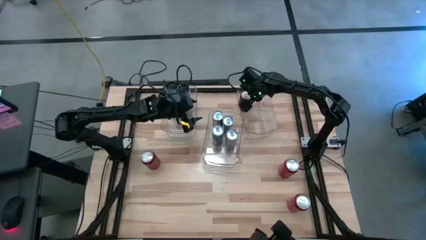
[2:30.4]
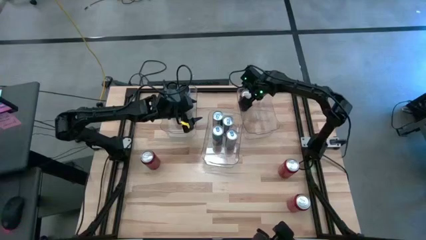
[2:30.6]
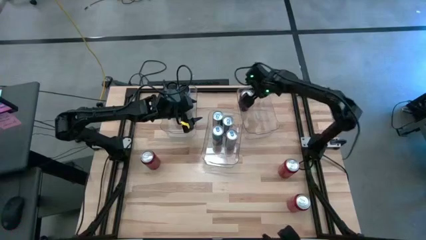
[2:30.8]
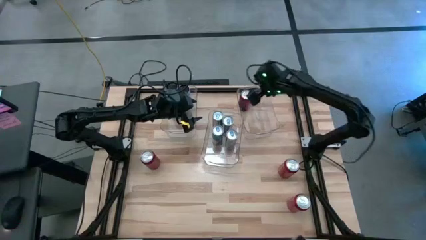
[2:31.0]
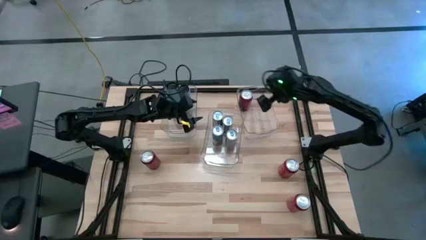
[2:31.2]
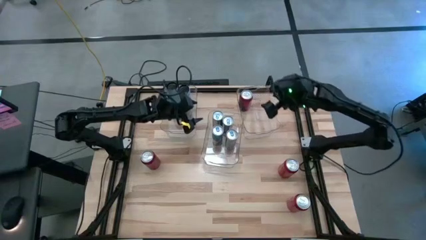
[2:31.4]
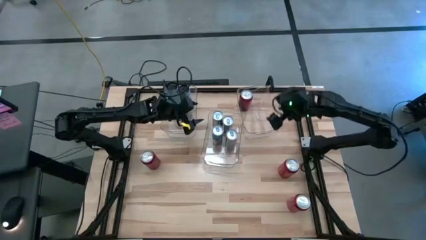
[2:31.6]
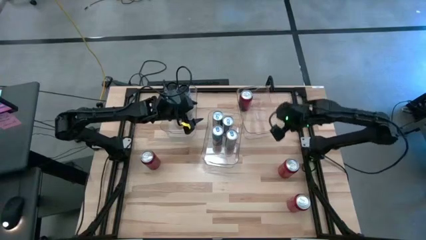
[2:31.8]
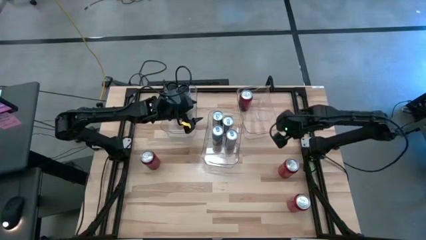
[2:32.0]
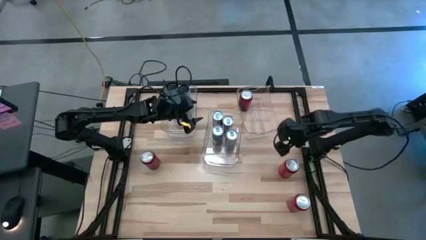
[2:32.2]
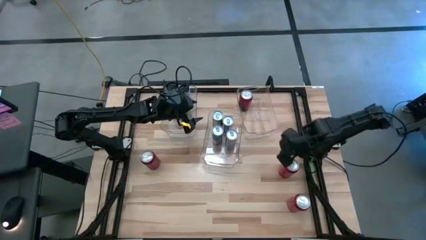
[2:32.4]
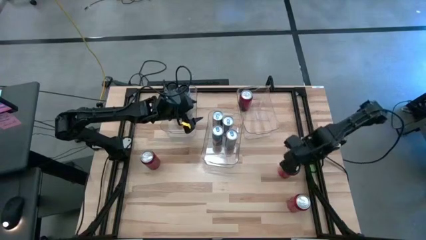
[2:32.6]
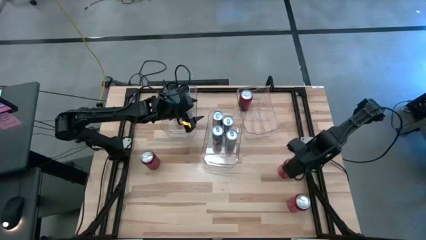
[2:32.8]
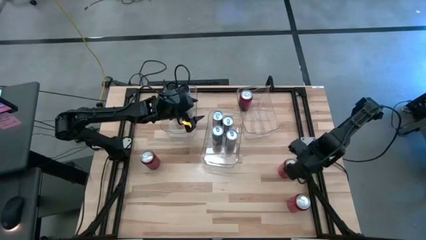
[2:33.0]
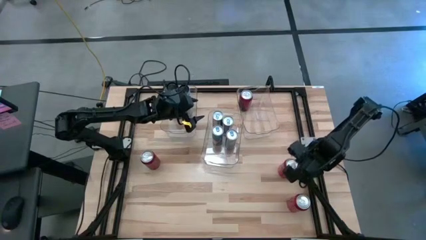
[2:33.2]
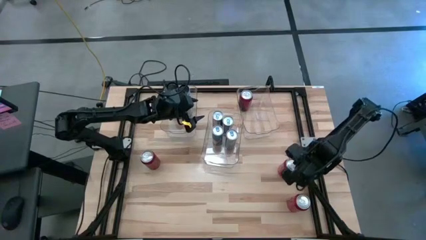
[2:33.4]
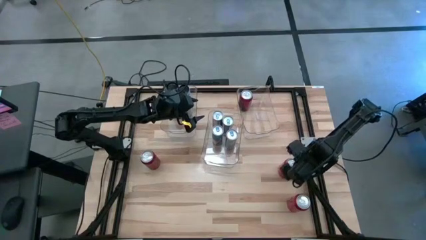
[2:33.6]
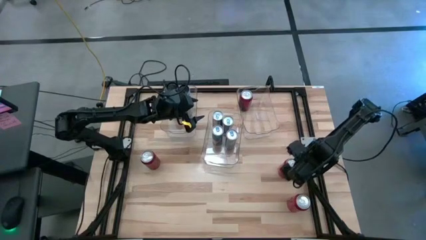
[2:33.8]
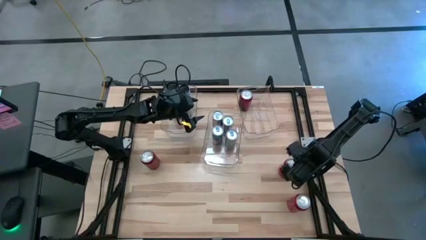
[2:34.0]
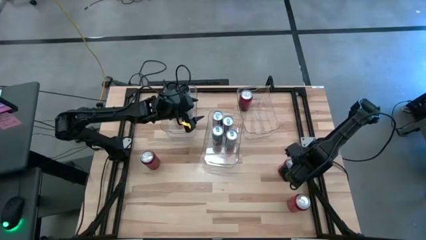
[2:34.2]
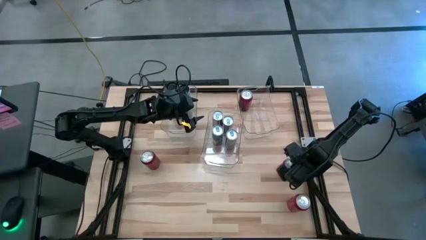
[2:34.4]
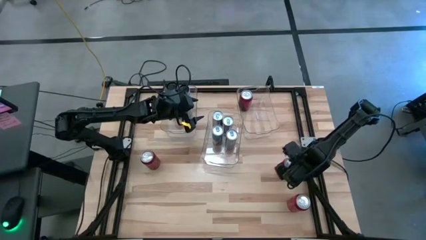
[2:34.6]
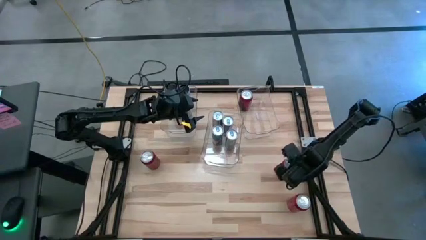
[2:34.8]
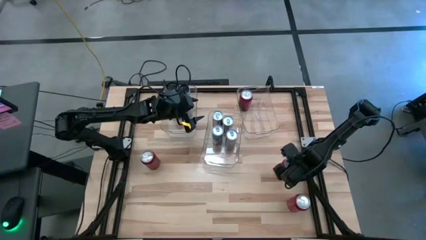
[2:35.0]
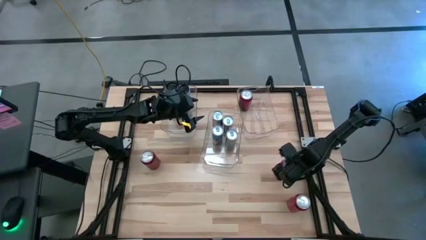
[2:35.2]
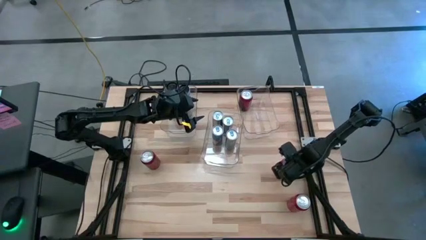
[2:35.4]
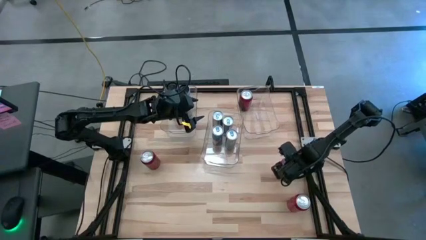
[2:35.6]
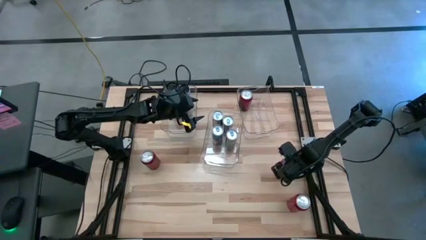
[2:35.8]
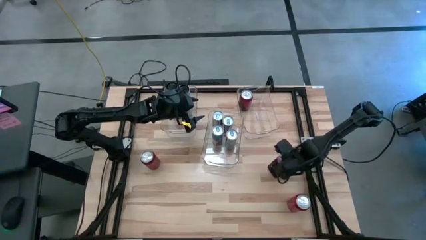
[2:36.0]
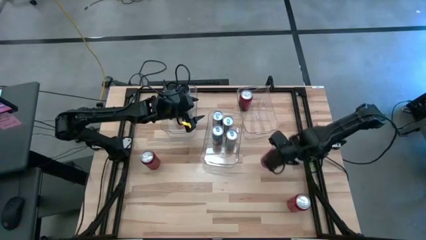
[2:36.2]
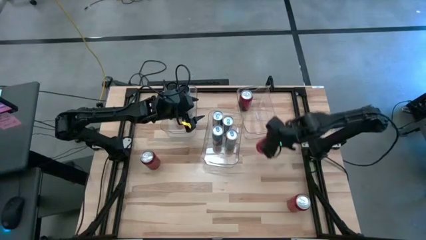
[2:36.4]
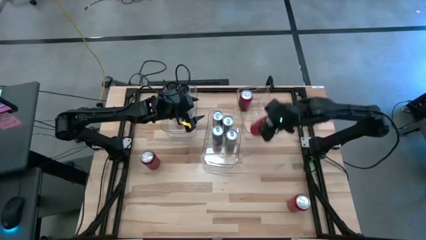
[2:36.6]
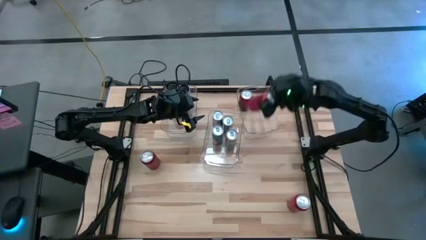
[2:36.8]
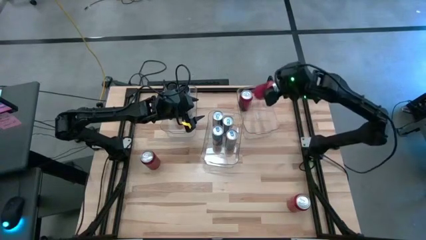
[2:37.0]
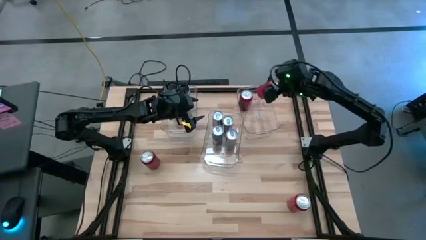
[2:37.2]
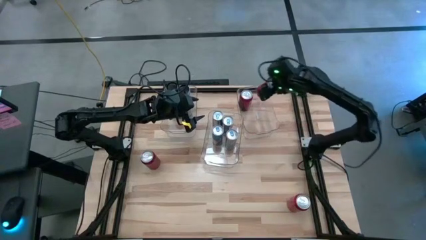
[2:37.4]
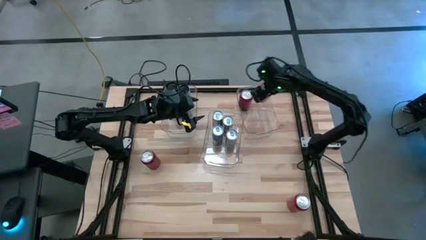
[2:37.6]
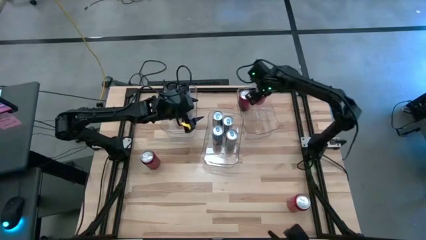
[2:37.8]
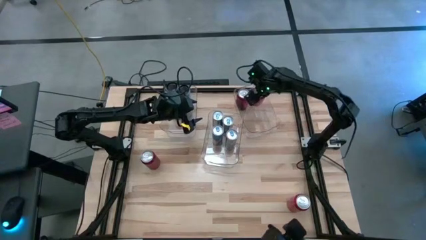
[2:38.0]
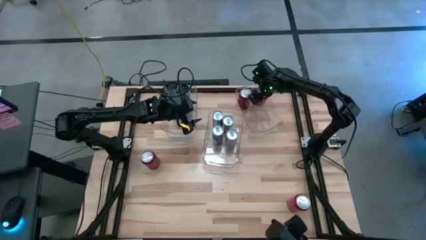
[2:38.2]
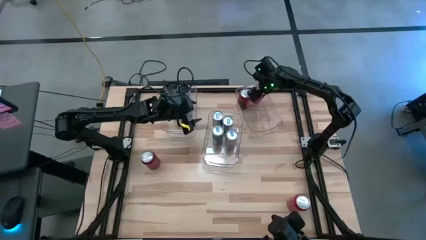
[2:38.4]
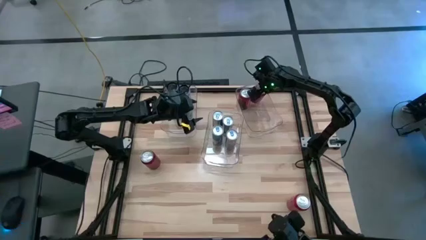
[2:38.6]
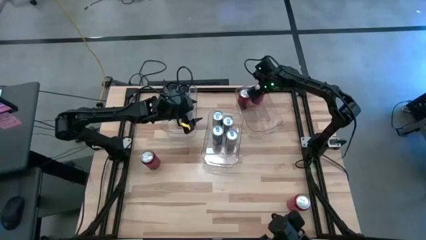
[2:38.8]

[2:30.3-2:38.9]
Task: Sort soda cans
Put the red-black soda can into the right transparent bin

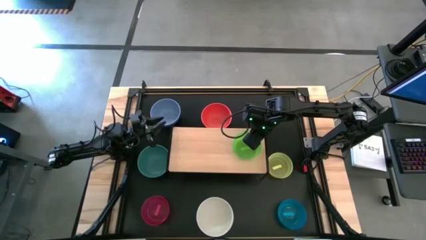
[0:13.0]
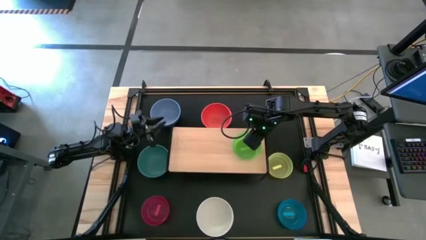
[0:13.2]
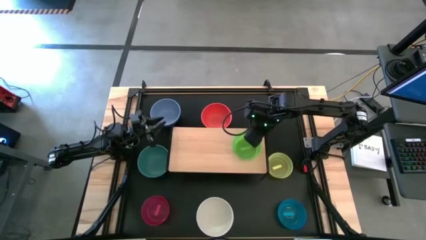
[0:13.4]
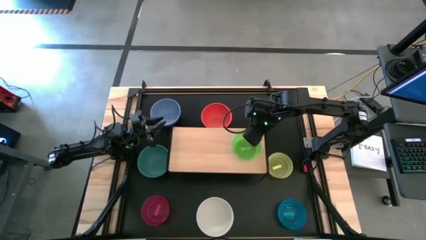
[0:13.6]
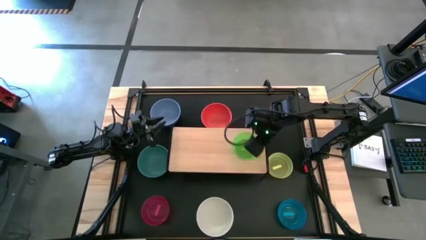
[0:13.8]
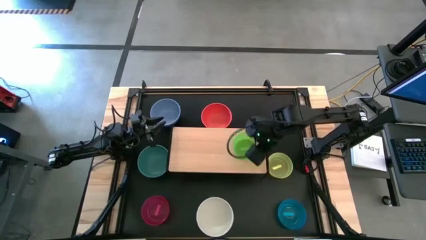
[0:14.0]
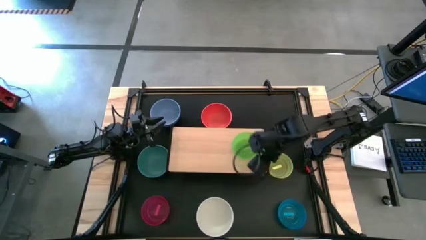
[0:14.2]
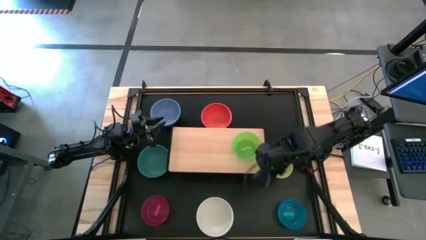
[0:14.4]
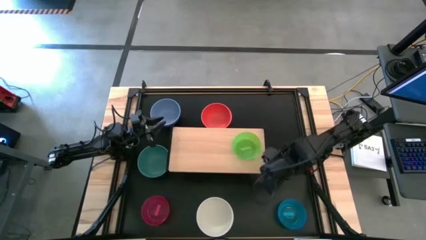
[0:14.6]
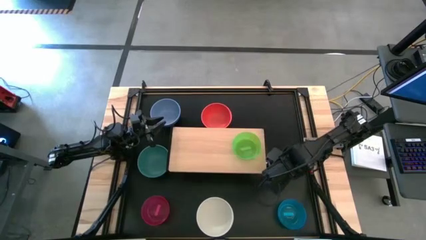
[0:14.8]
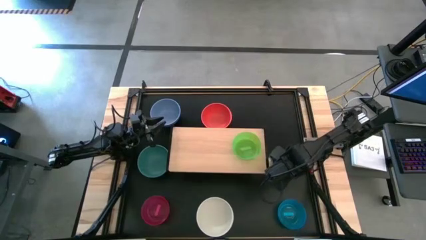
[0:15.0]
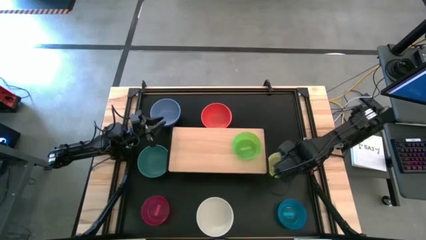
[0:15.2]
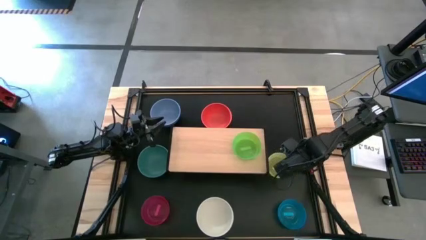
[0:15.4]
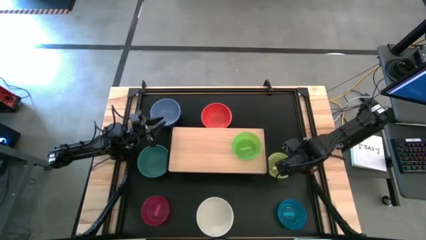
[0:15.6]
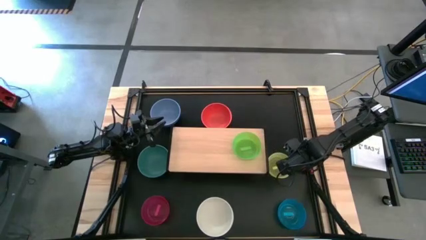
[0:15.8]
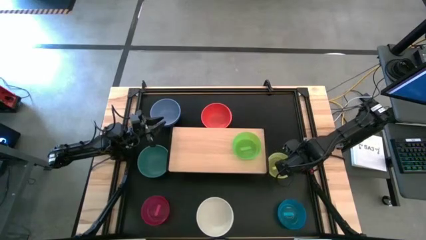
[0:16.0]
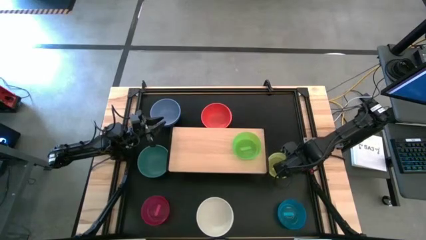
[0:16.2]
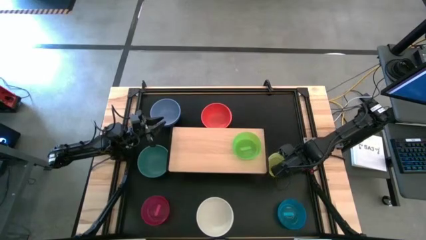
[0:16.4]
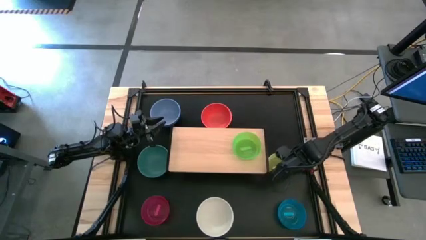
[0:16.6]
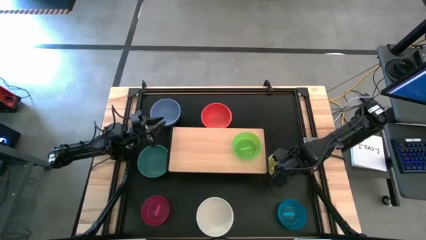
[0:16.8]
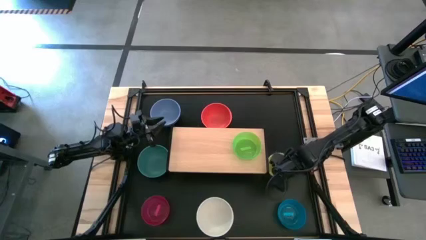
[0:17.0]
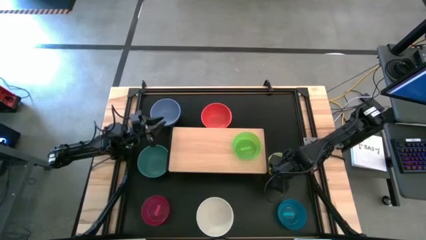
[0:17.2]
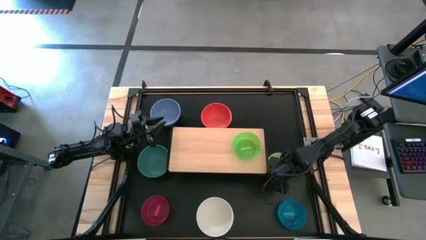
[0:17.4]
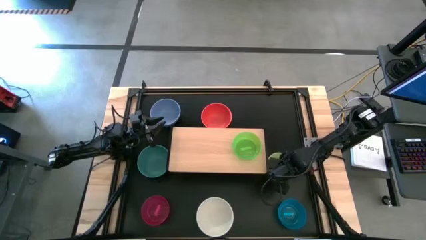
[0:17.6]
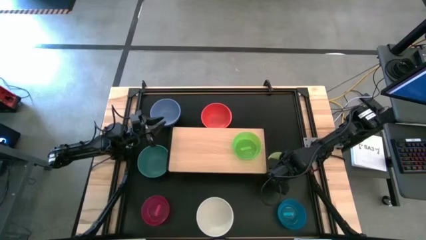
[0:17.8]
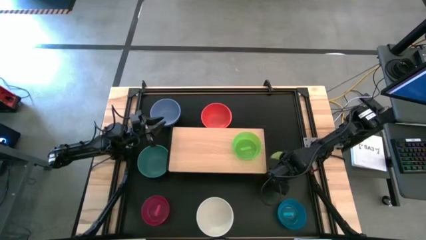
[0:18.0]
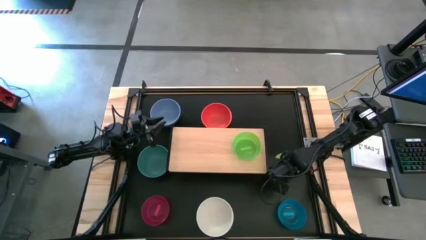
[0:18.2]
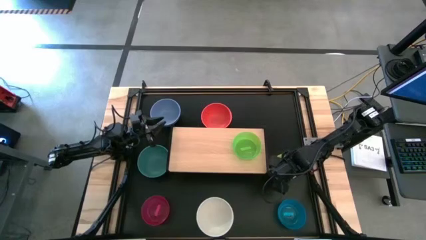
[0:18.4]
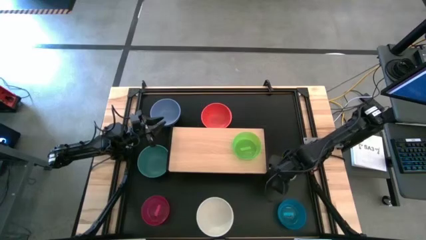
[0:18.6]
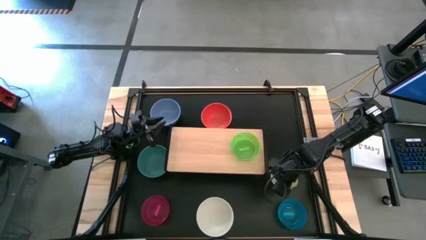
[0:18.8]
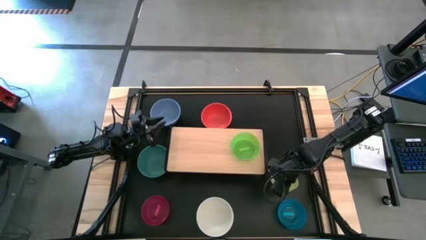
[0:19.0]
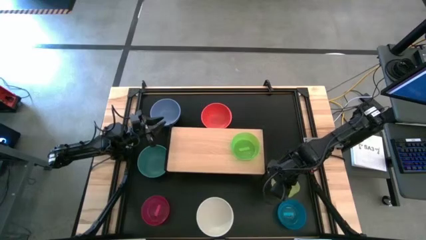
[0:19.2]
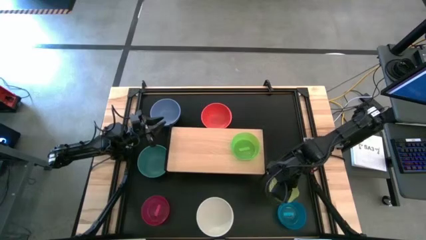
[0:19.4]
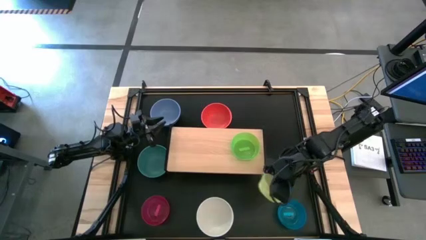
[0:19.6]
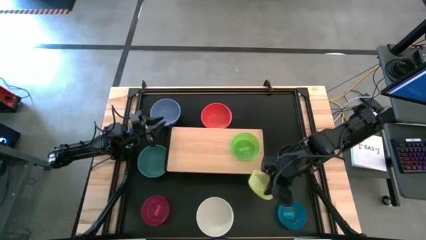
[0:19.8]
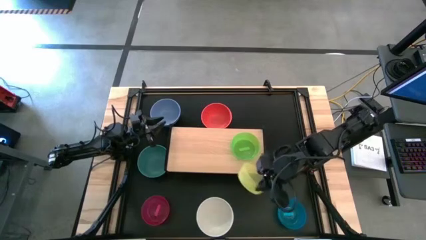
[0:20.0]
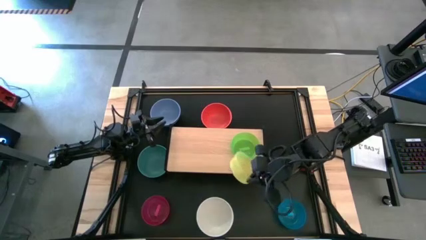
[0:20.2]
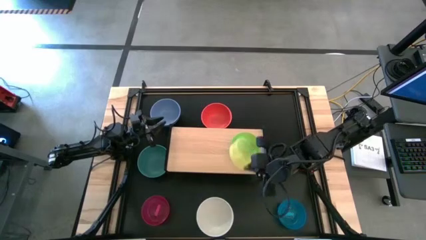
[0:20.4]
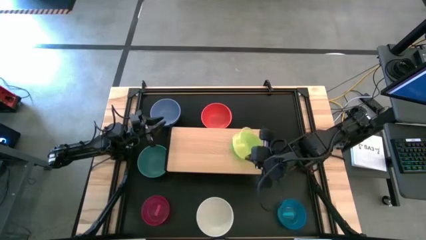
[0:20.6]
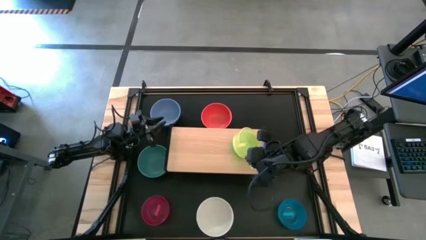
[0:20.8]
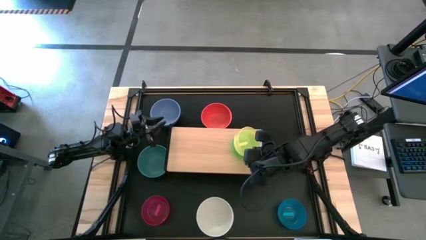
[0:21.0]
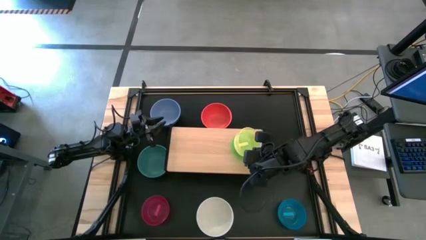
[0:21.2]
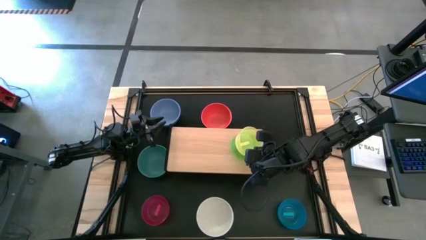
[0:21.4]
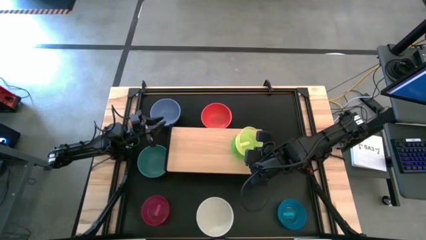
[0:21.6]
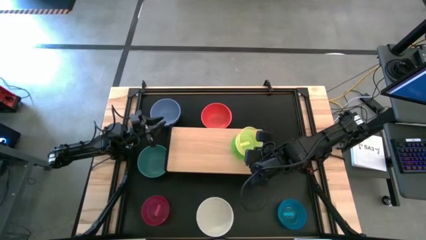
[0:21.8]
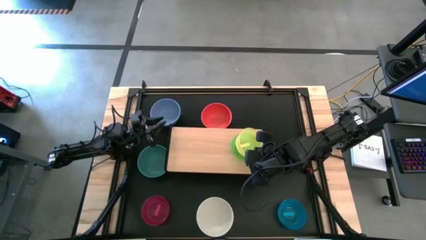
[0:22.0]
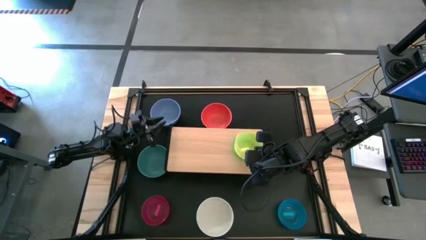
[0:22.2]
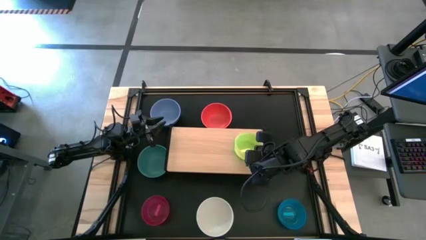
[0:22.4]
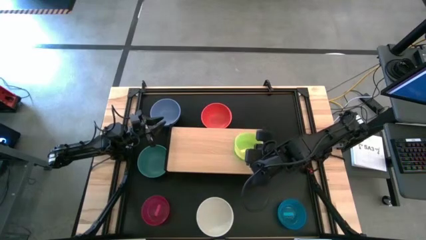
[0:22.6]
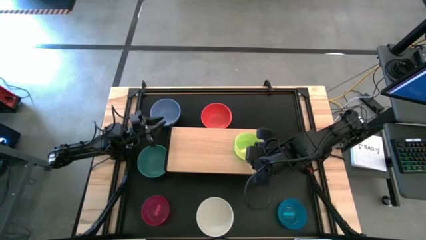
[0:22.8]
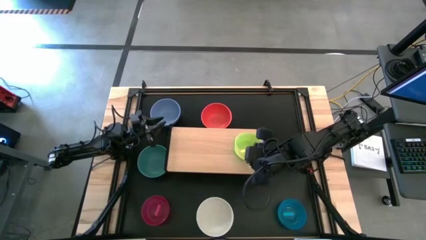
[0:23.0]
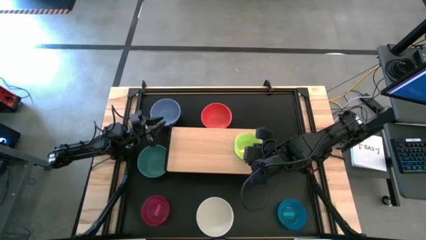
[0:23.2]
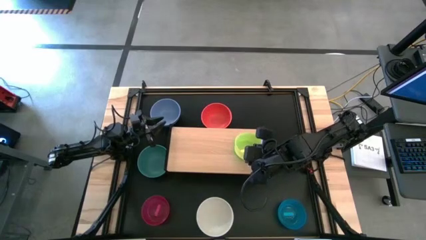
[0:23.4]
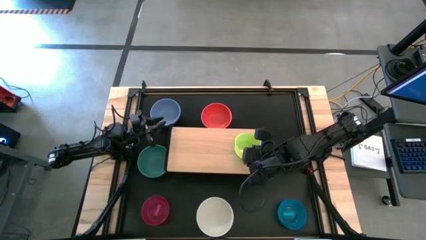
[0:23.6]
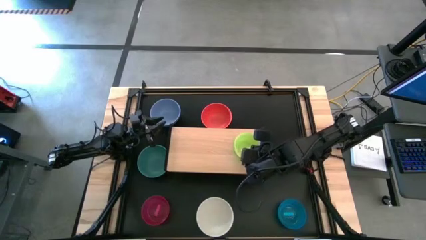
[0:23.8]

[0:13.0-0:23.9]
Task: Place and stack bowls onto a shelf
Stack the small yellow bowl on top of the small green bowl on the shelf
